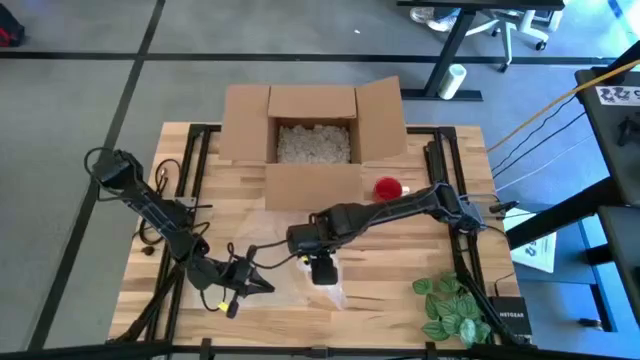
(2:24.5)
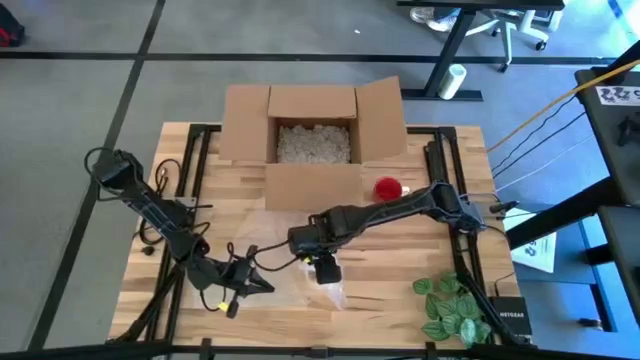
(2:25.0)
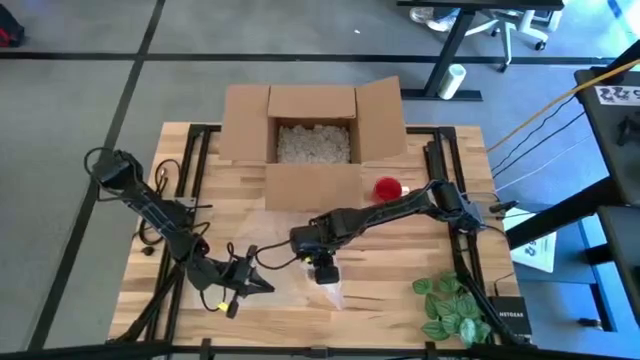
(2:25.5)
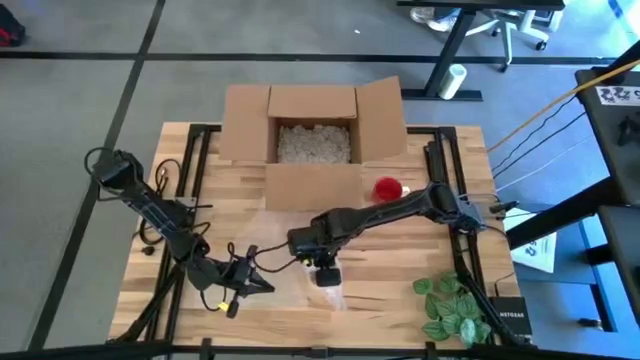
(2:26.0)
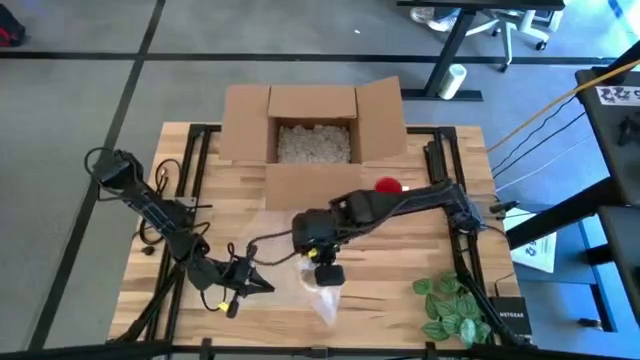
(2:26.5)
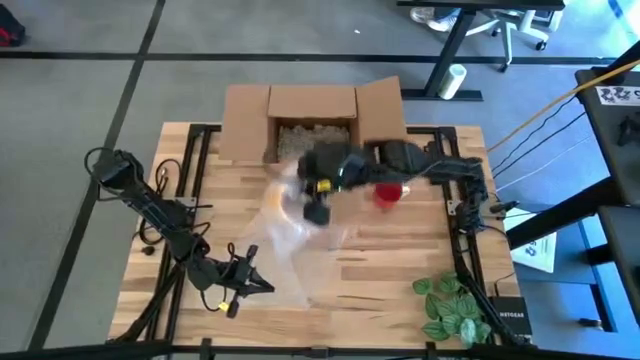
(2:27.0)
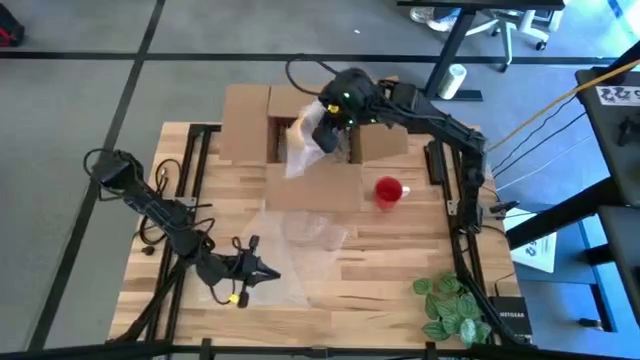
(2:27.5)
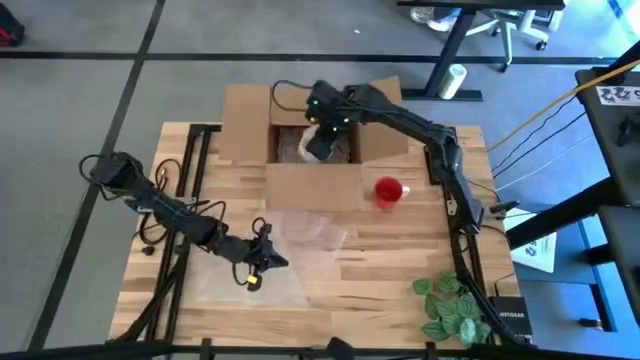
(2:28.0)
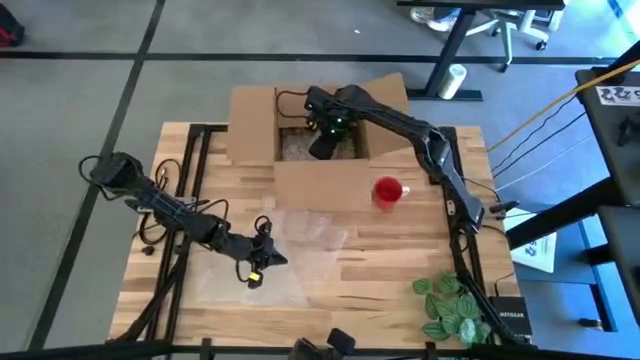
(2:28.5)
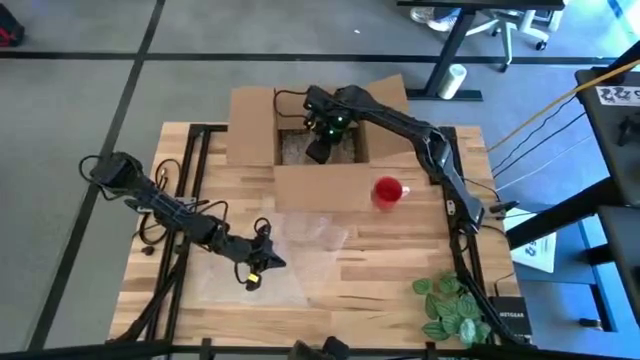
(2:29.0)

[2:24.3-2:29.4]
Task: wrap mug
Put the wrapped yellow mug into the box

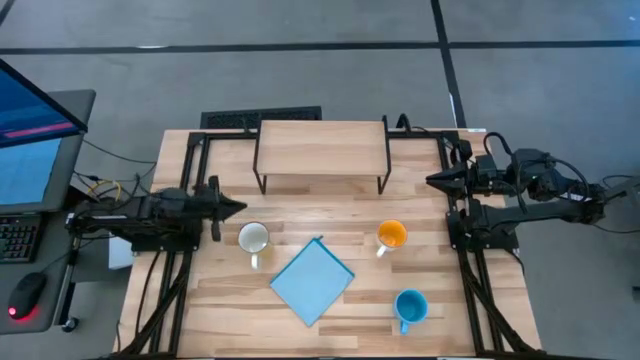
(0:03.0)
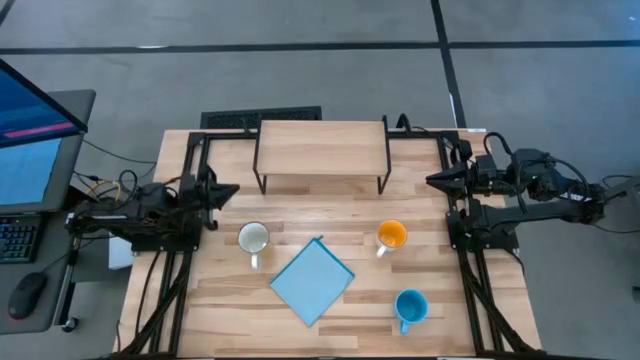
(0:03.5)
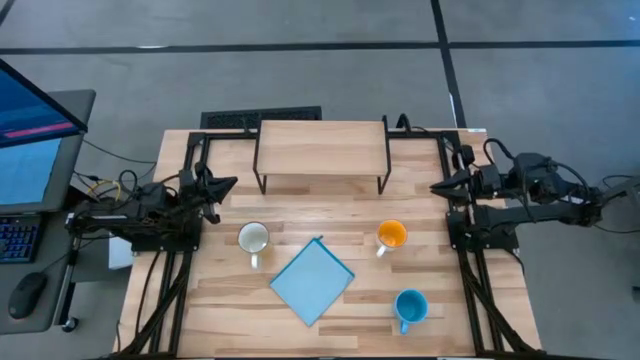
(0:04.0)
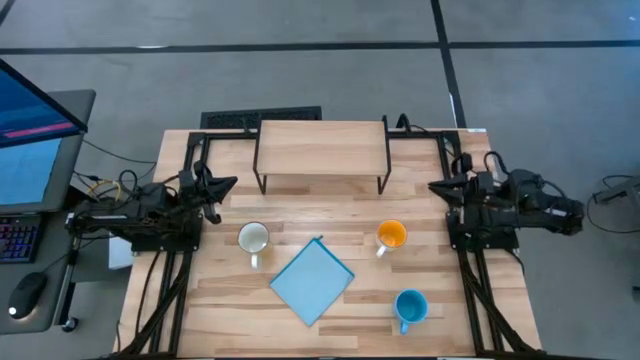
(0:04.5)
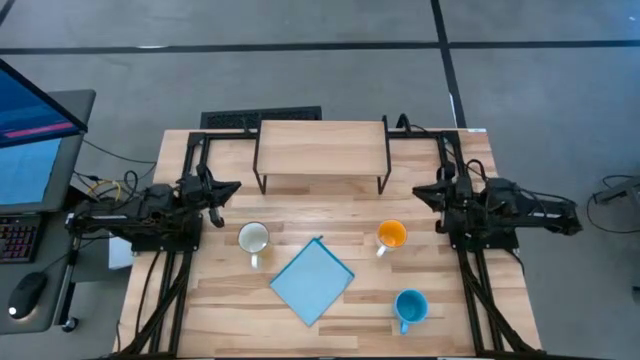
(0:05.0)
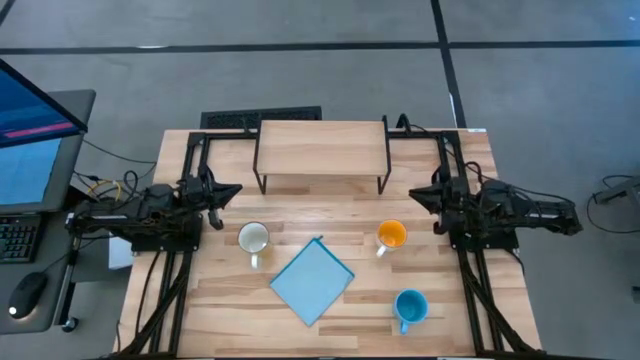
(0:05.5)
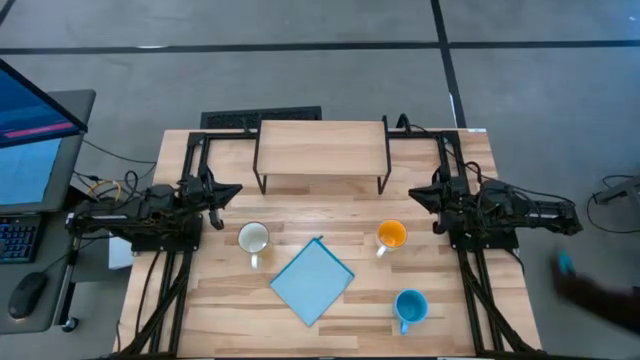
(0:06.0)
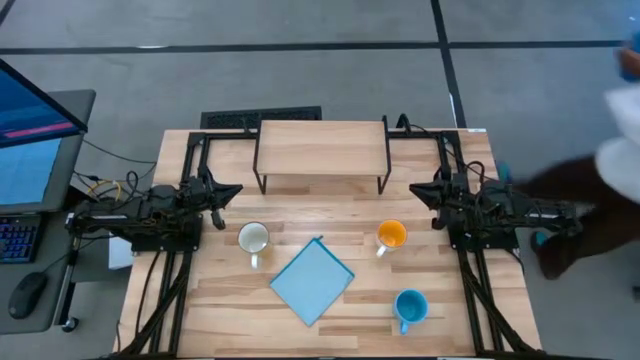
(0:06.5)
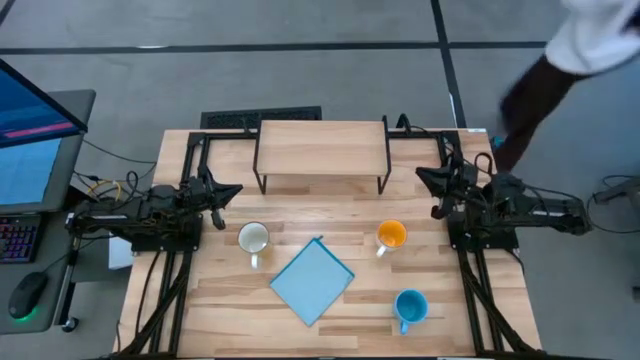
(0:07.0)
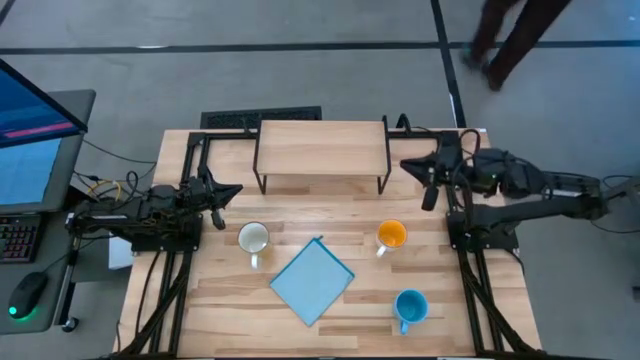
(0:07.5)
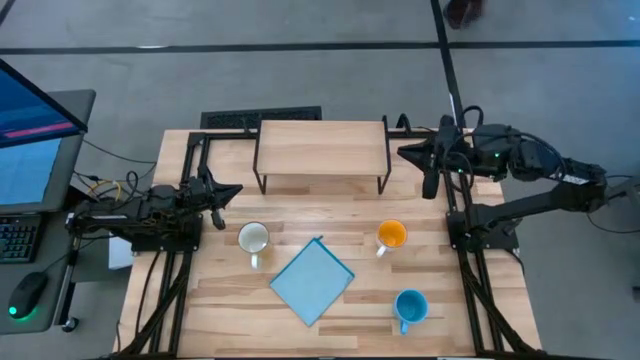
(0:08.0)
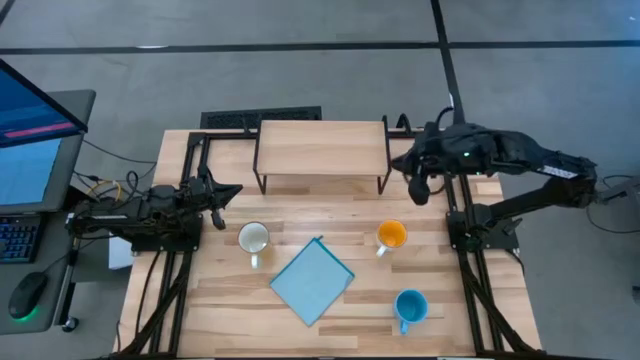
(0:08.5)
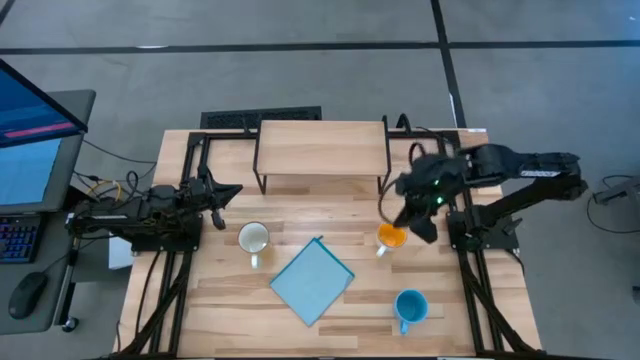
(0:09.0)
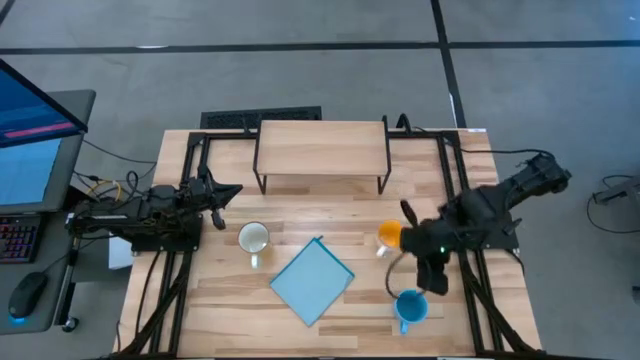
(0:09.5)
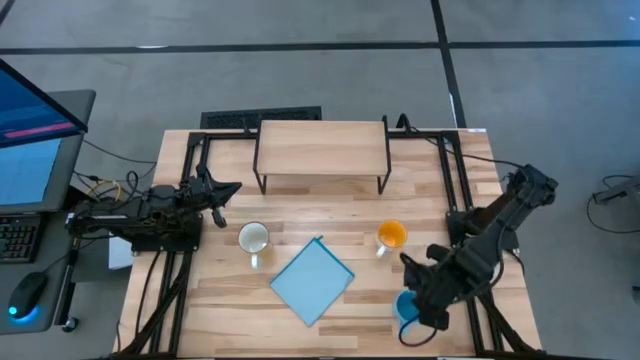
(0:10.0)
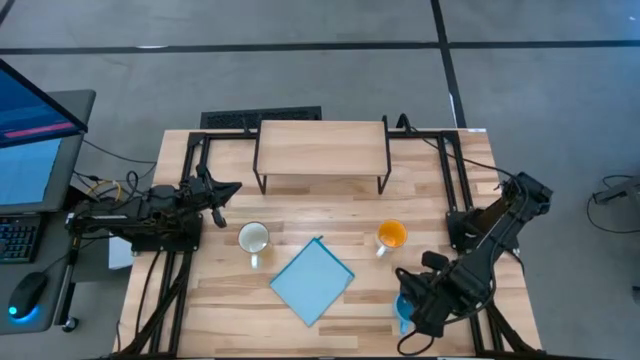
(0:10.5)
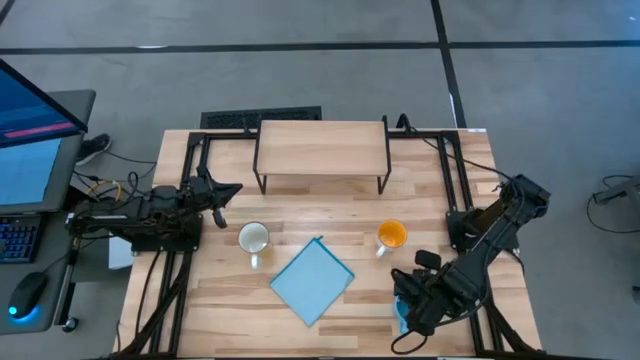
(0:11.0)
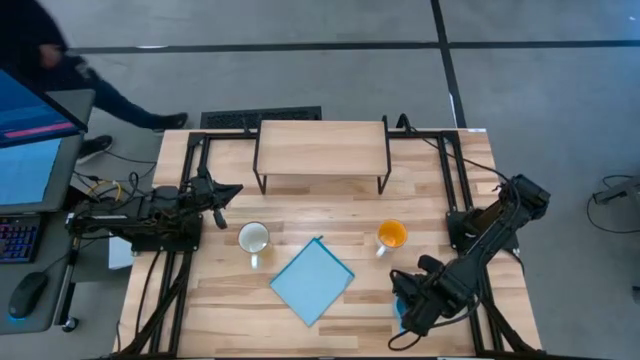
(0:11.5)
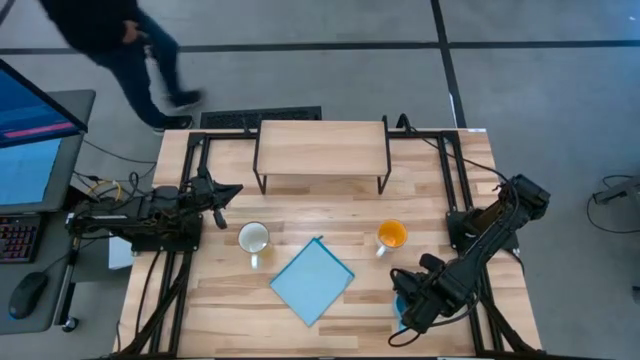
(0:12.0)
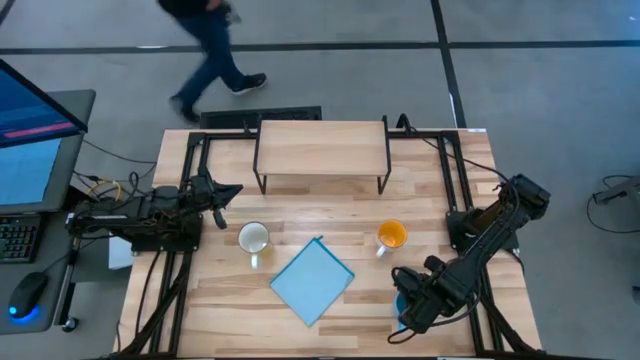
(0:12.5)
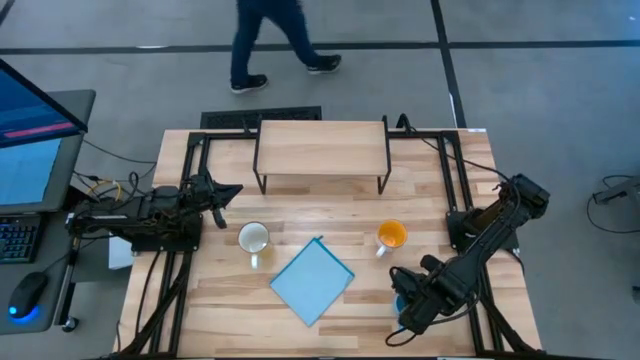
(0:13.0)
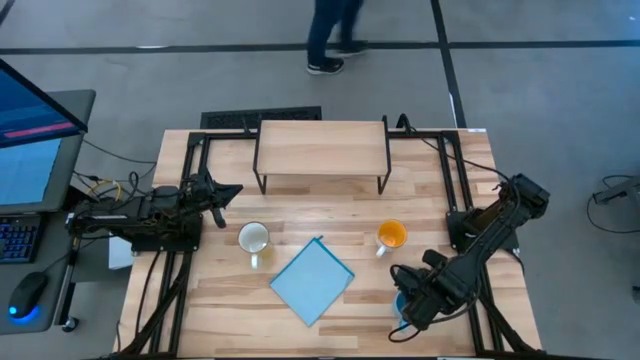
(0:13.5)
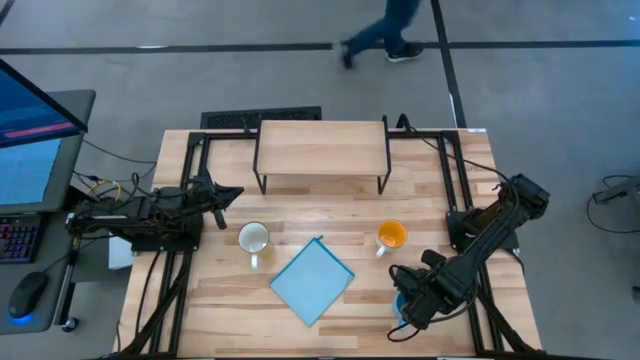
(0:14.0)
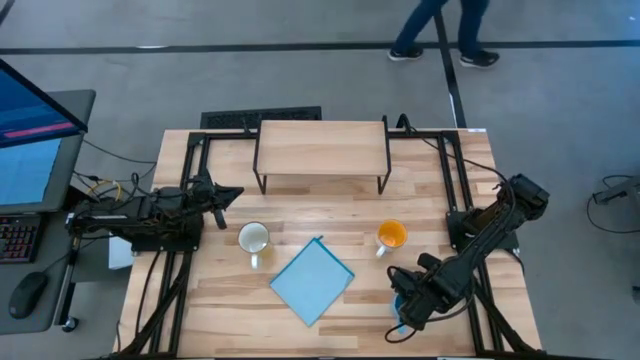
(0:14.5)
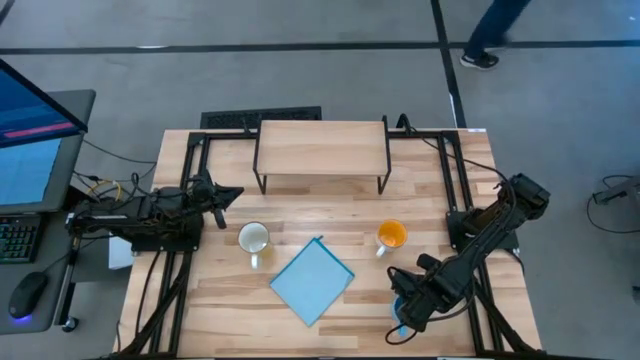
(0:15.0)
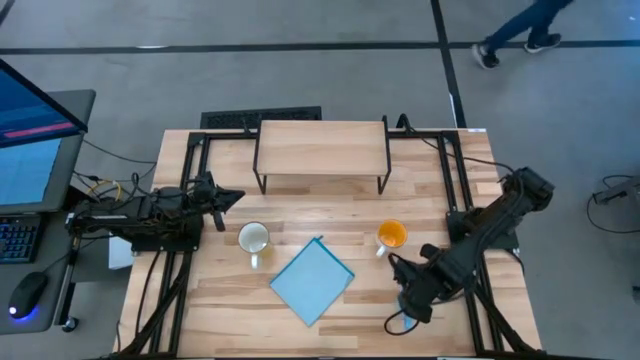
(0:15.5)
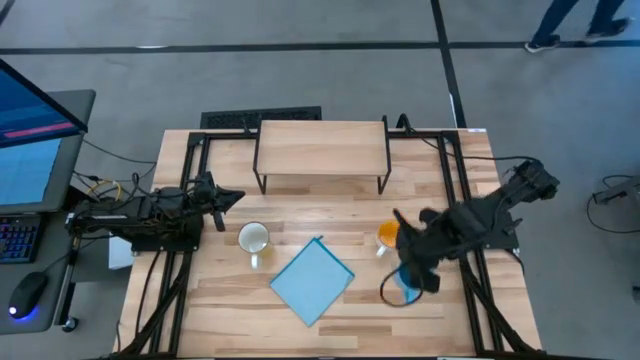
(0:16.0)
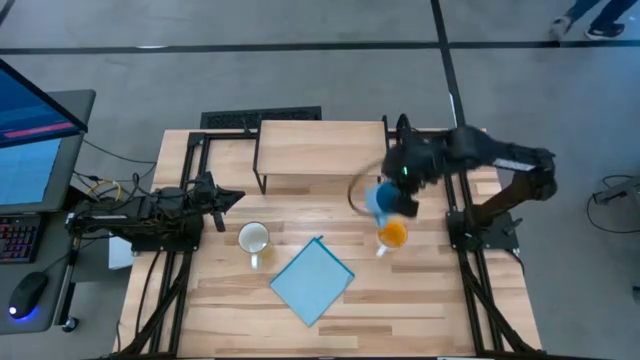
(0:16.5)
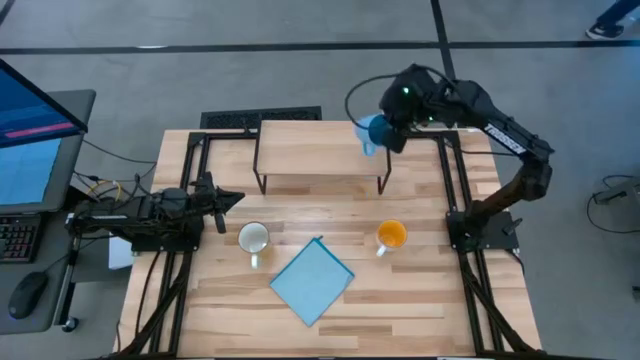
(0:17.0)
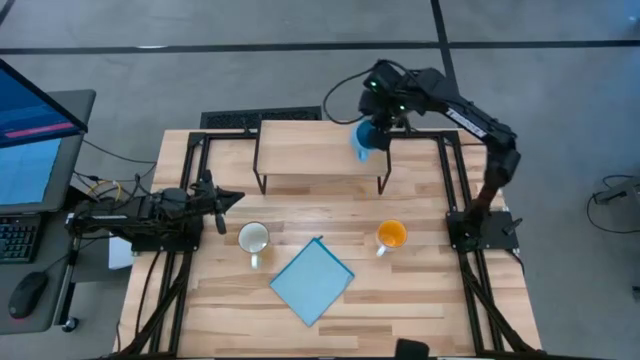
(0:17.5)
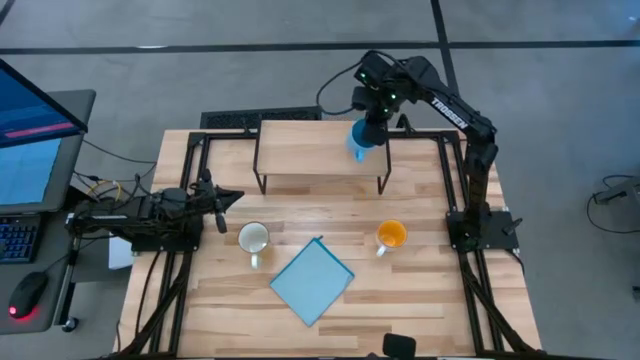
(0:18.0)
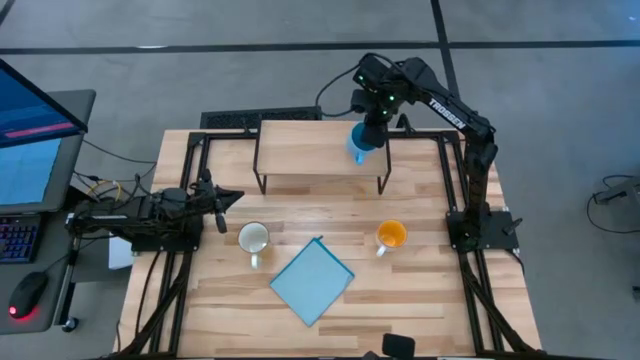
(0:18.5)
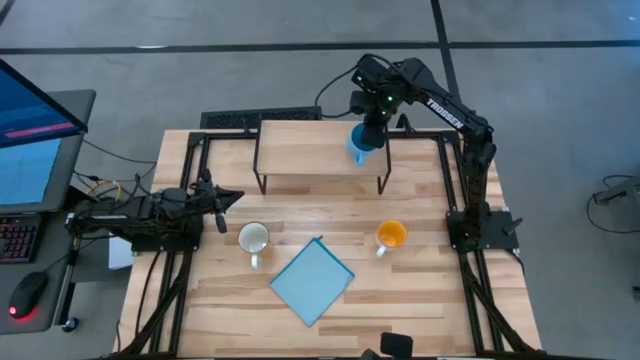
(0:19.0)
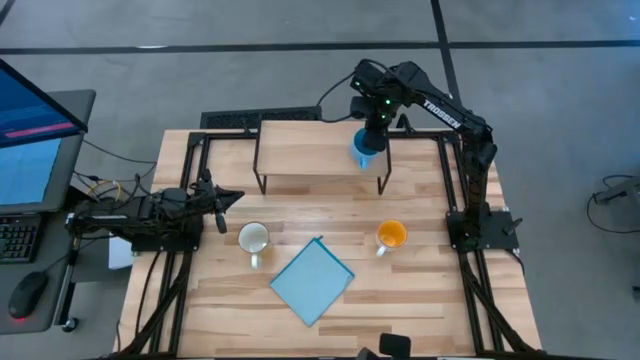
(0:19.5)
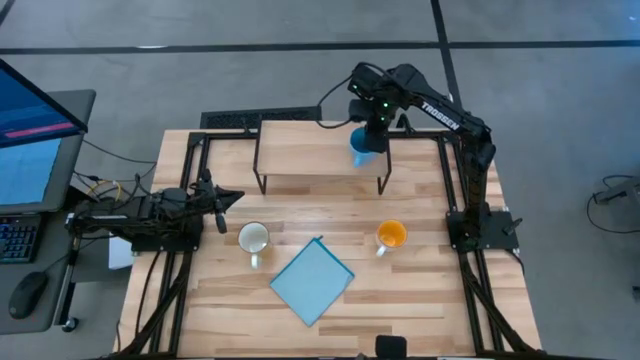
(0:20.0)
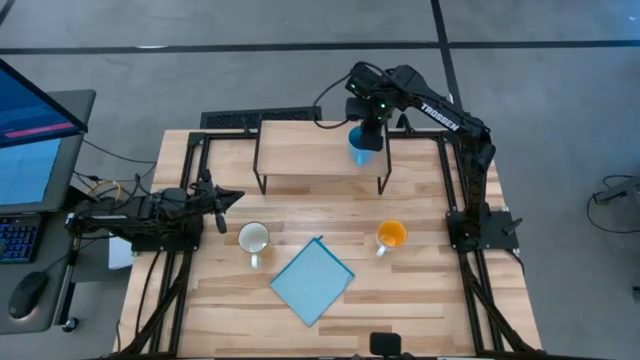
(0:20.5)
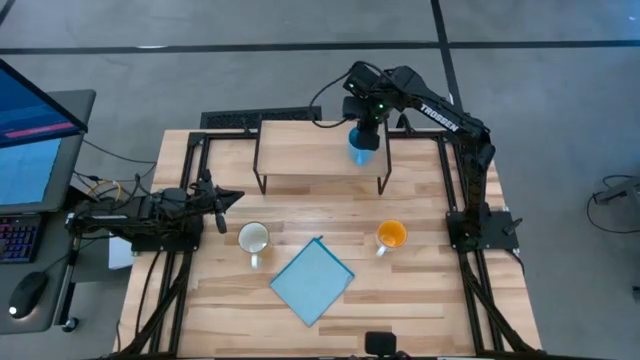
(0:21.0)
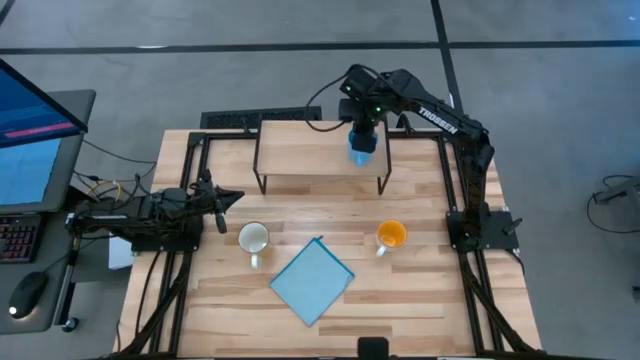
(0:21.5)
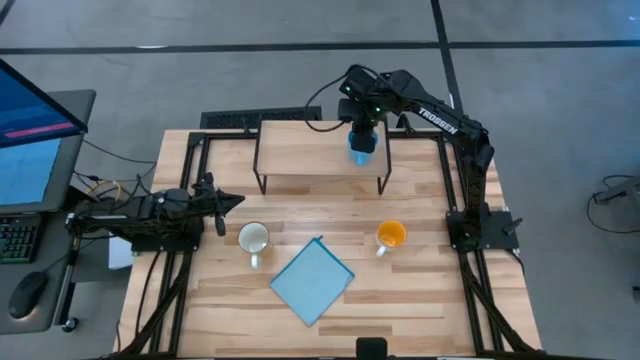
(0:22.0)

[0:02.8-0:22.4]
Task: Stack small to large cups/mugs on shelf
Put the blue mug on the shelf
